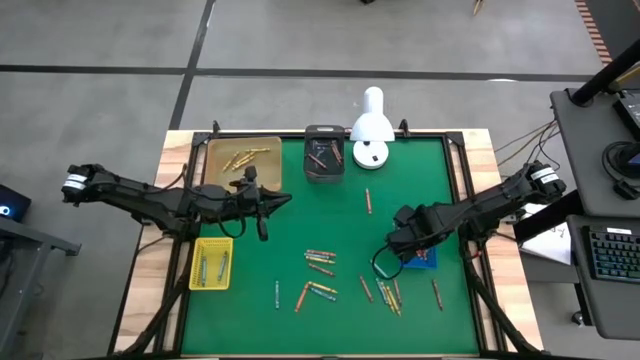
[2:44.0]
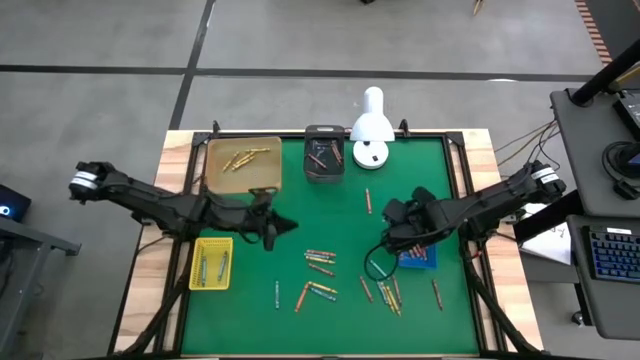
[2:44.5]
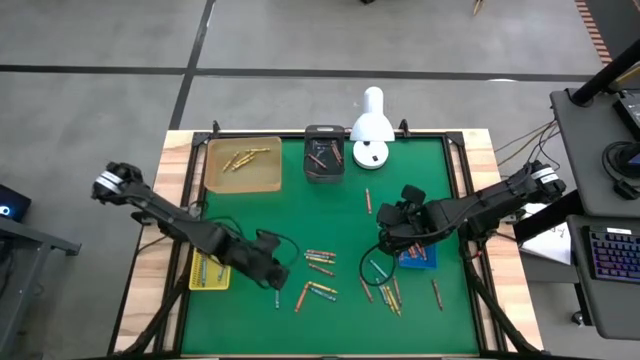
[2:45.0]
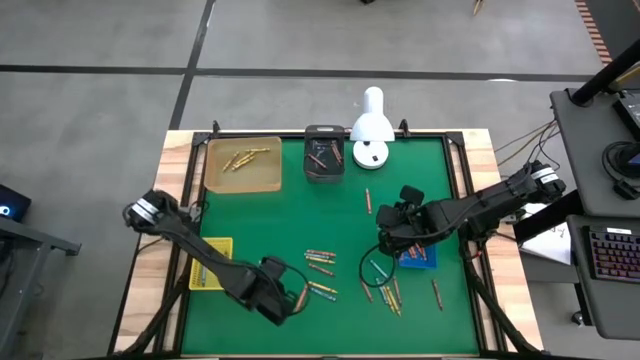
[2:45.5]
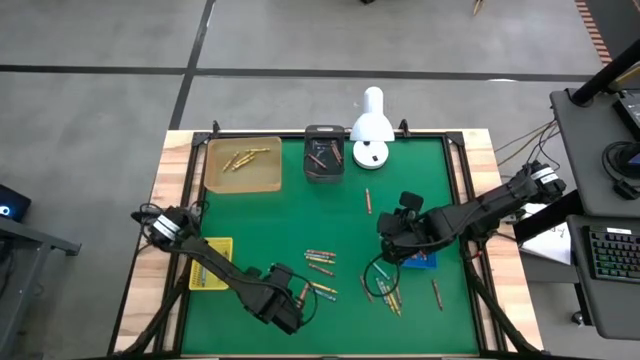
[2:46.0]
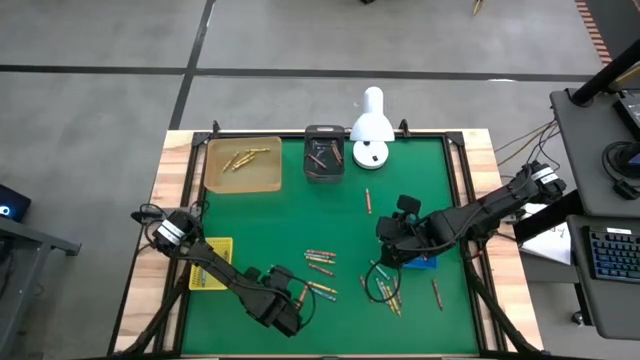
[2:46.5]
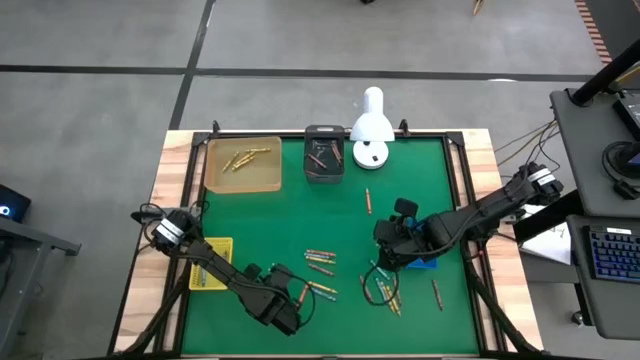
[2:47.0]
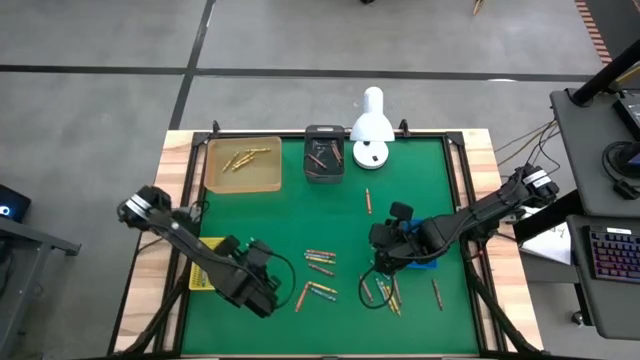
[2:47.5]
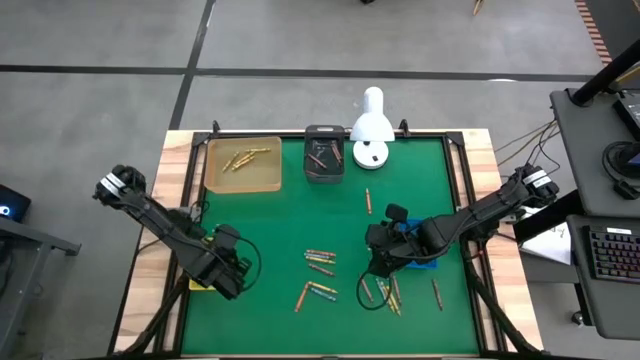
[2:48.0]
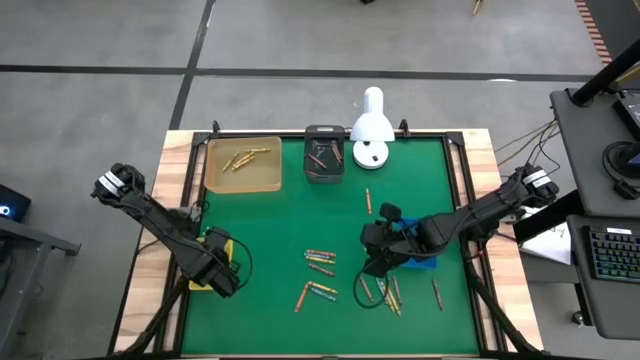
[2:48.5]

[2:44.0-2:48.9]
Task: Sort crayons
Put the blue crayon into the yellow bin

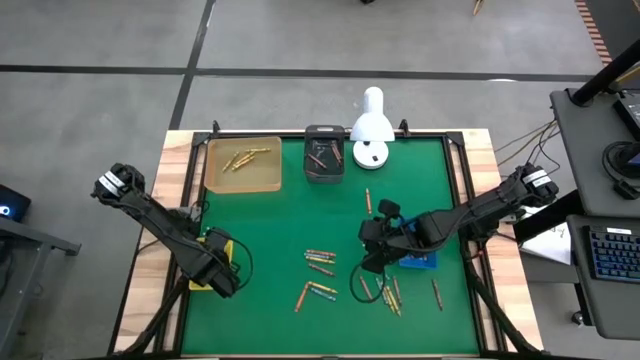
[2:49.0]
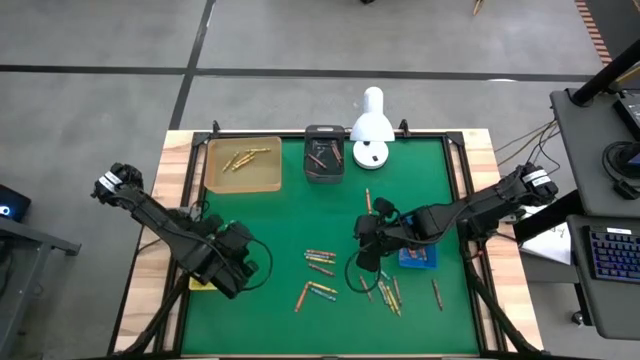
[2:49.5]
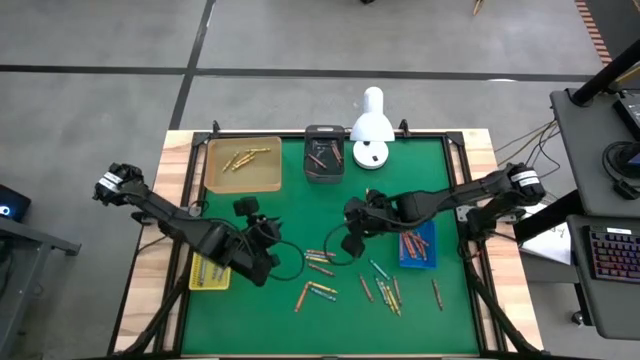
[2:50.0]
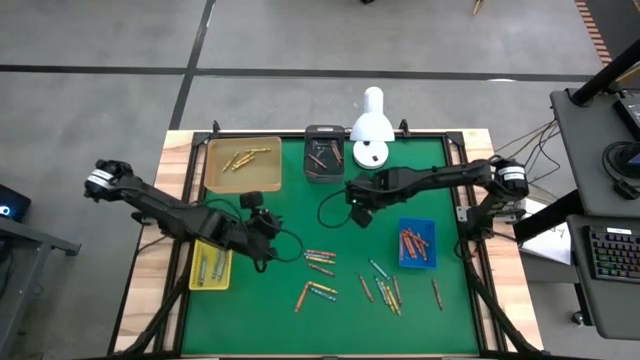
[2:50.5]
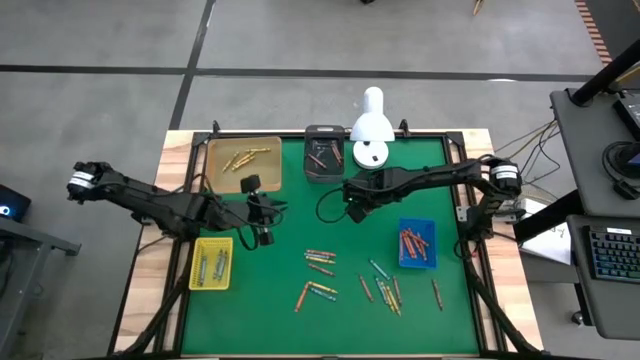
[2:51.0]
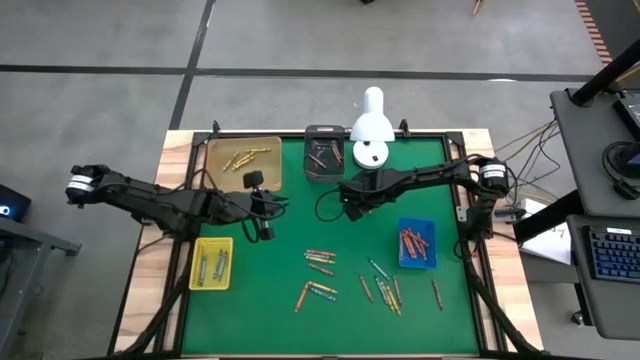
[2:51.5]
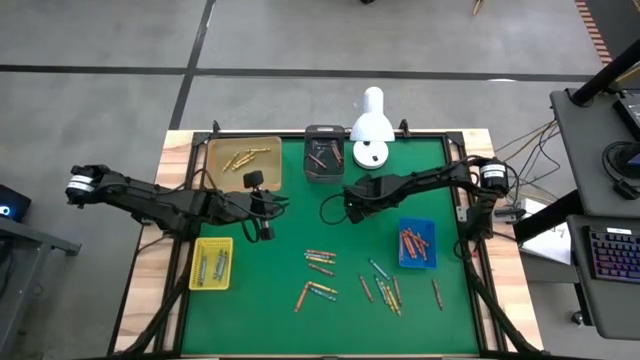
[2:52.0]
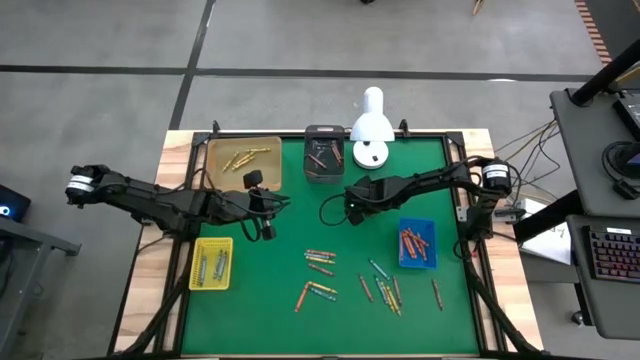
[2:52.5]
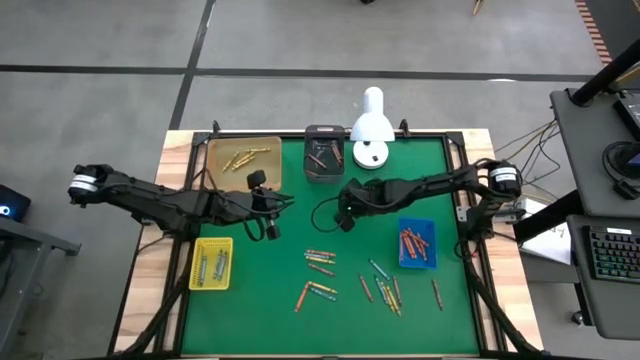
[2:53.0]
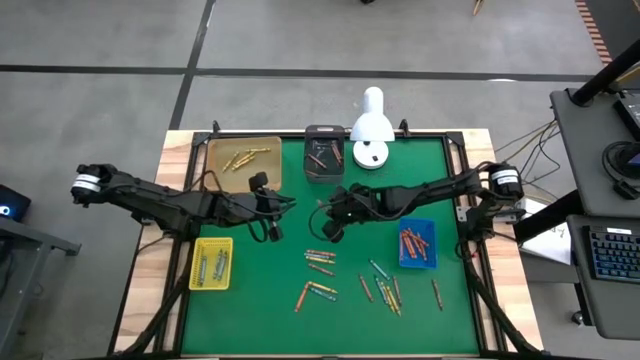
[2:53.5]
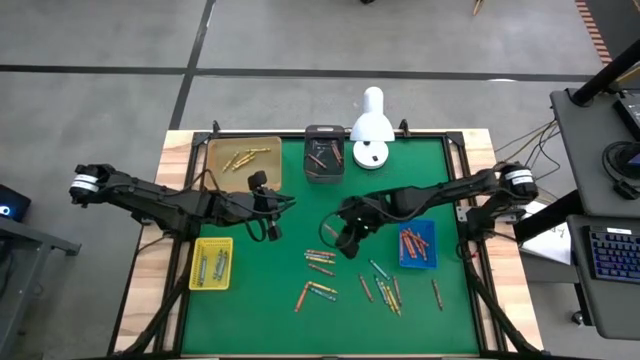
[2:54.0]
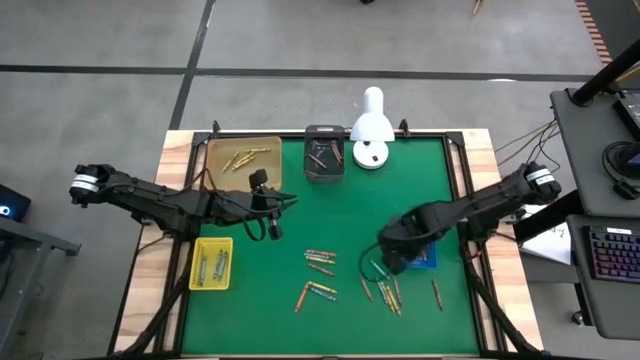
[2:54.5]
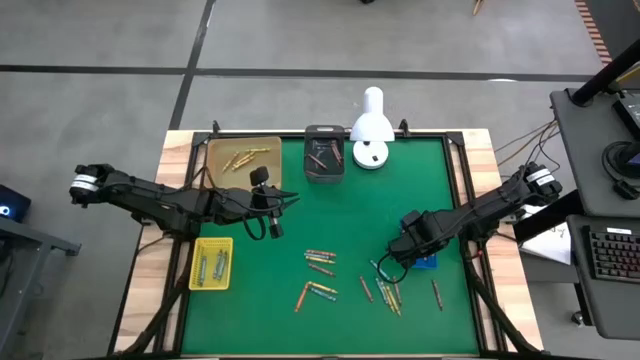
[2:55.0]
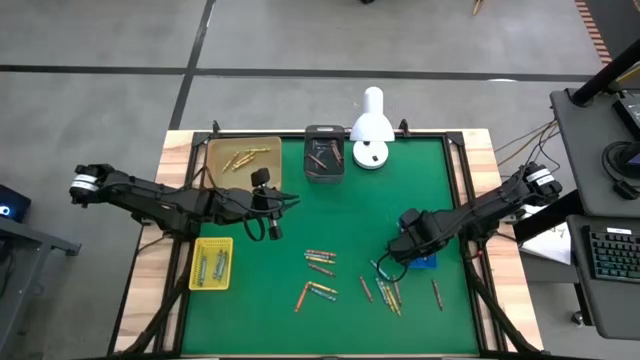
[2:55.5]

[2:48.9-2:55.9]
Put the orange crayon into the blue bin

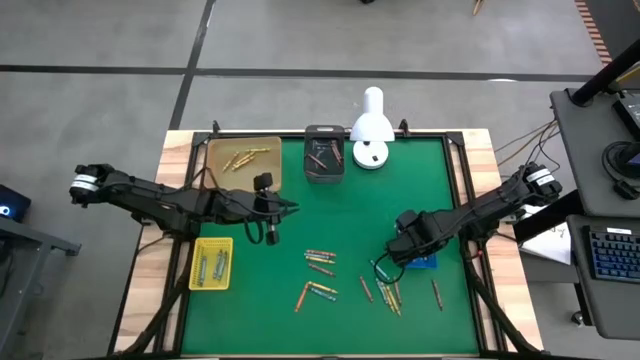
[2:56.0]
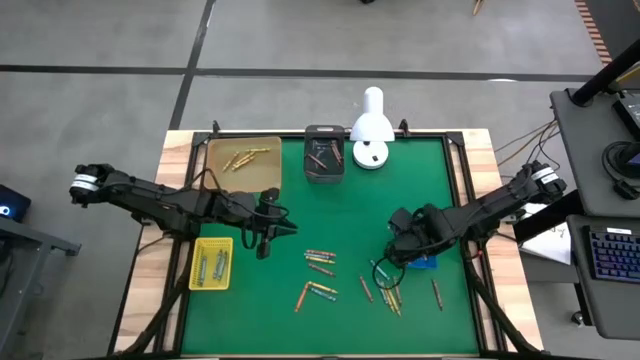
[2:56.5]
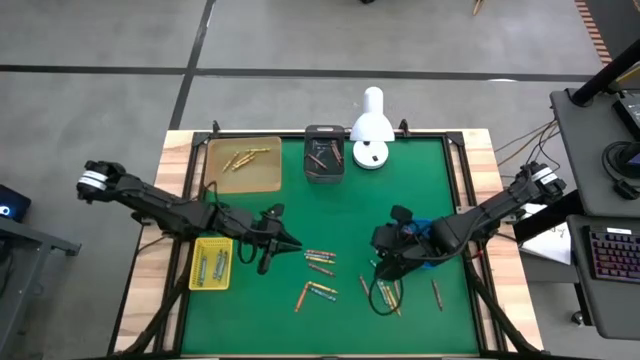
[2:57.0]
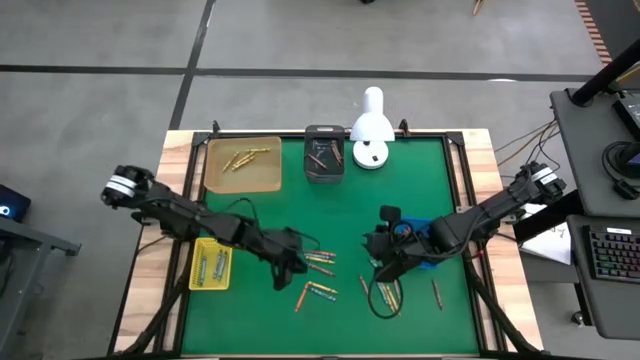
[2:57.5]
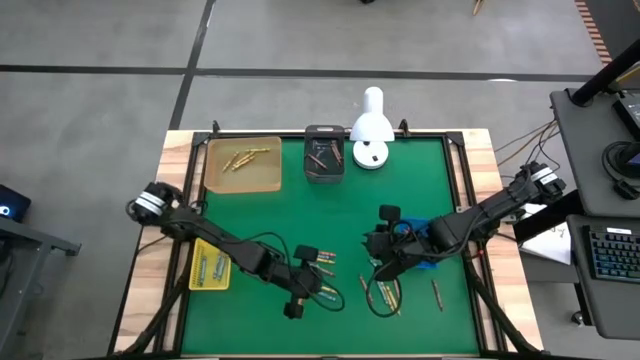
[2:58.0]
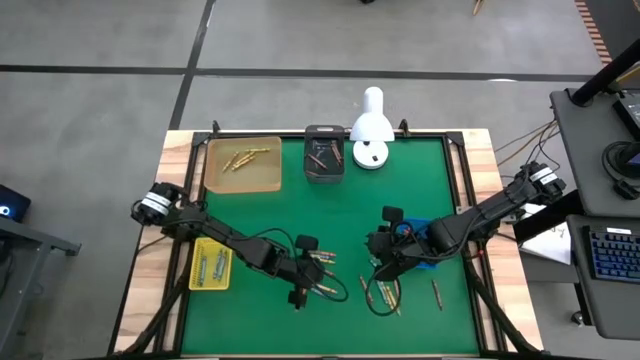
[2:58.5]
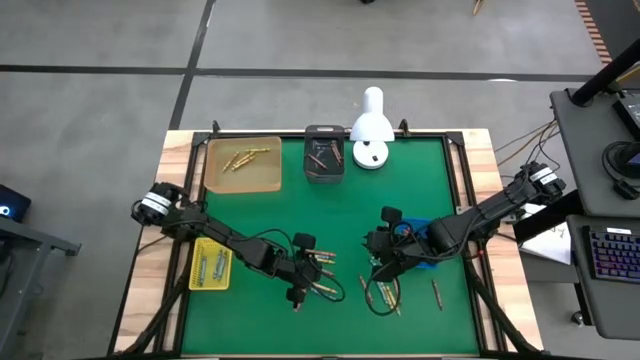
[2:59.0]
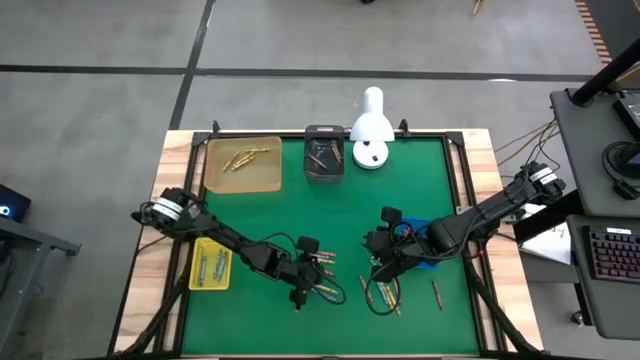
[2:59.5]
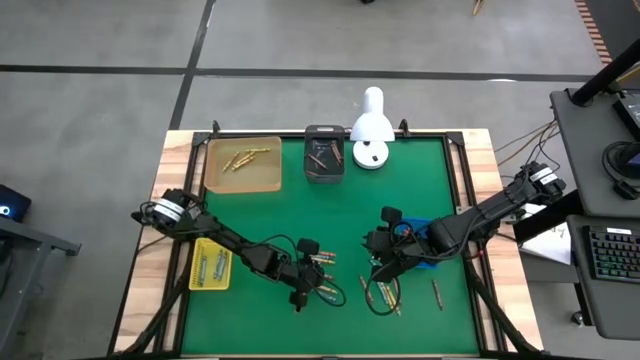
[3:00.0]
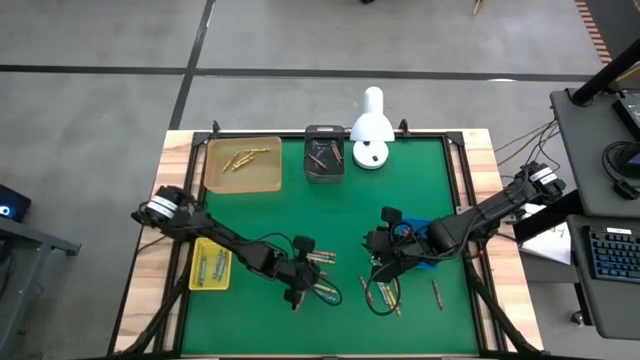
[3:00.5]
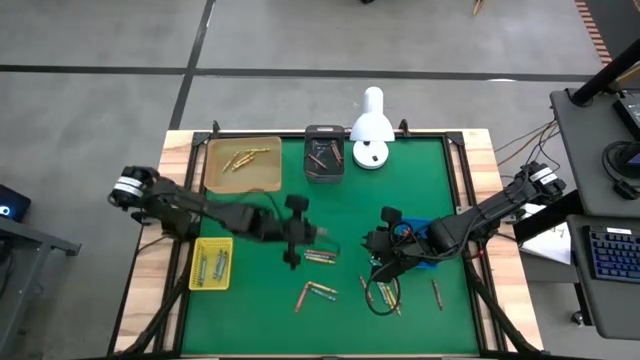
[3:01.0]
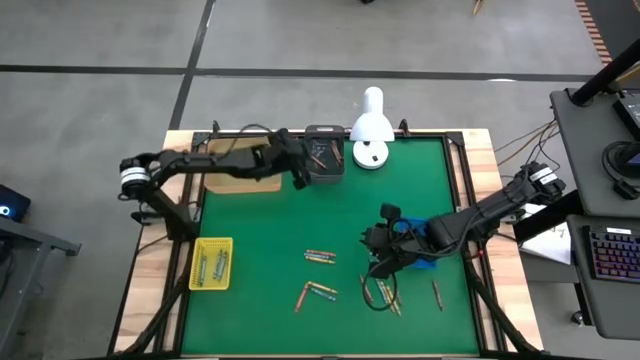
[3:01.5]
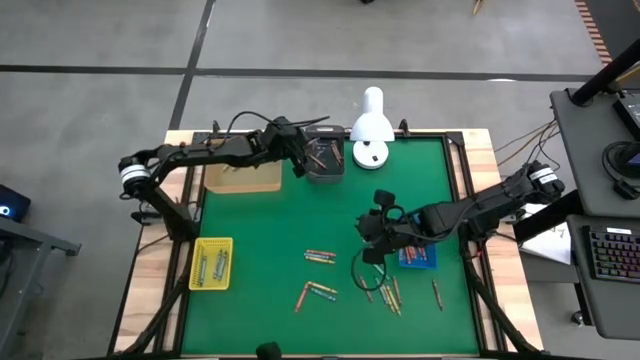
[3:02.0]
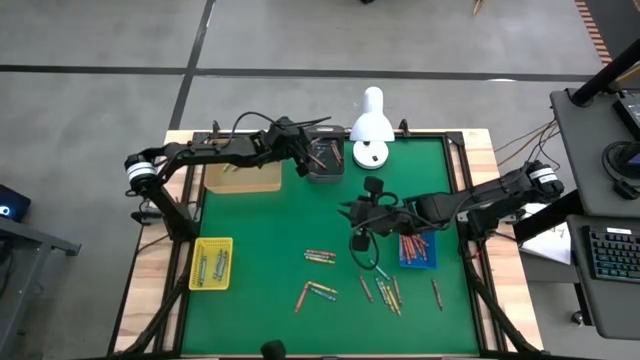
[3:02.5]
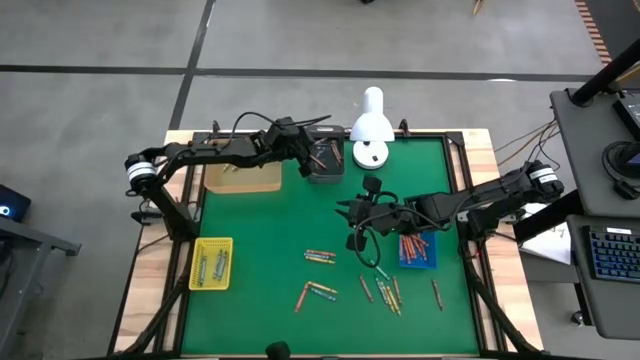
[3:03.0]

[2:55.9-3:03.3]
Put the brown crayon into the black bin

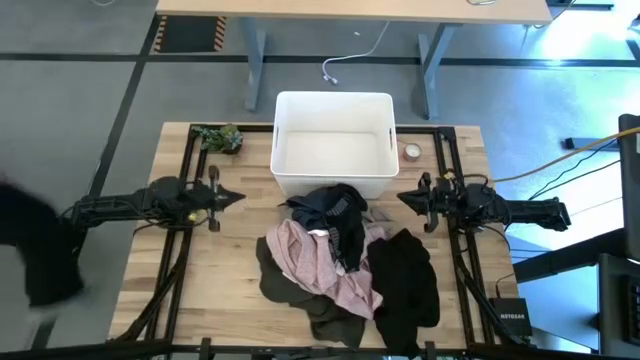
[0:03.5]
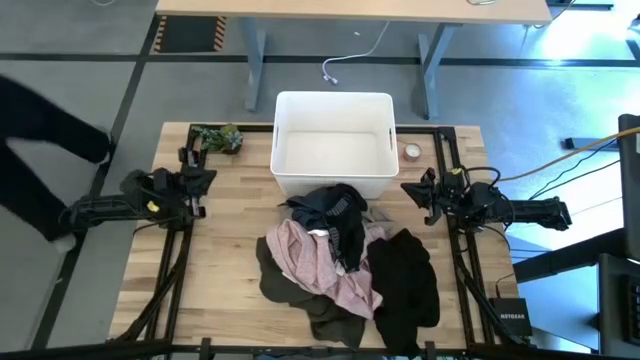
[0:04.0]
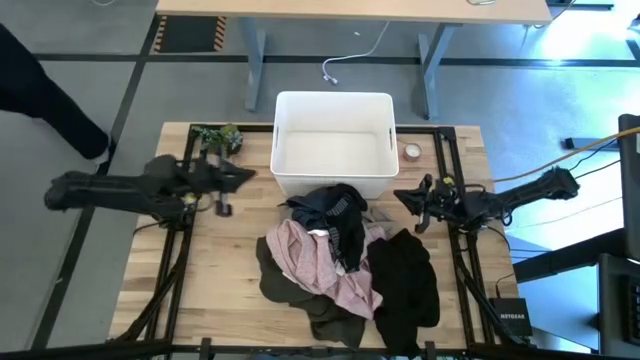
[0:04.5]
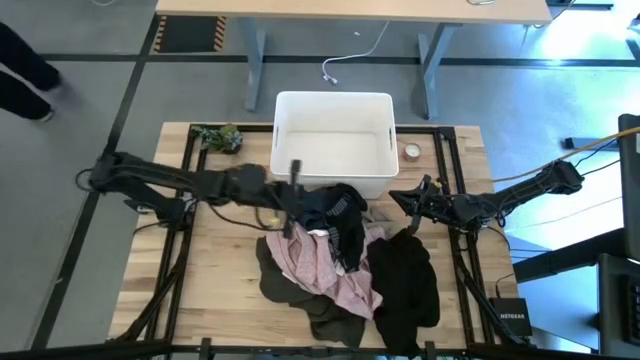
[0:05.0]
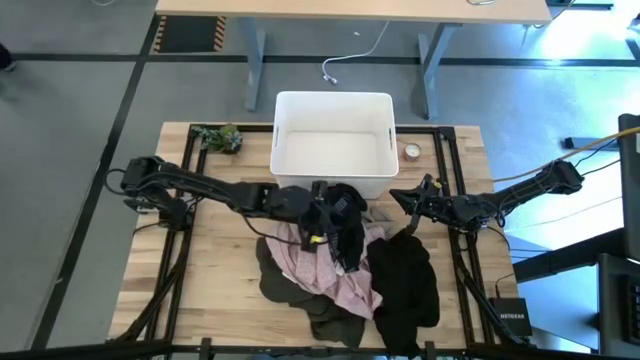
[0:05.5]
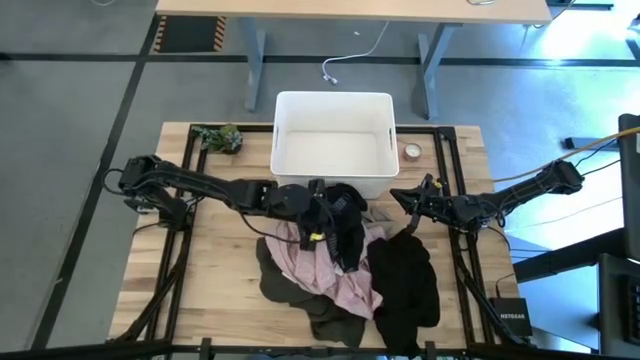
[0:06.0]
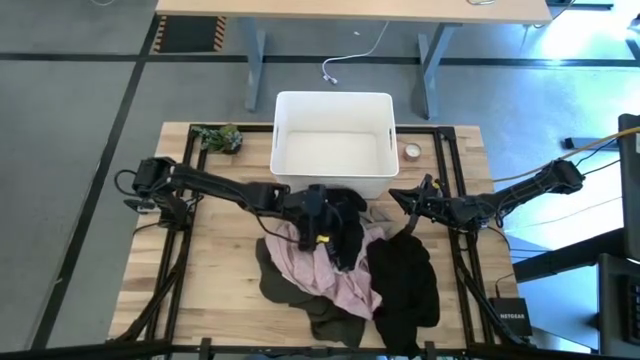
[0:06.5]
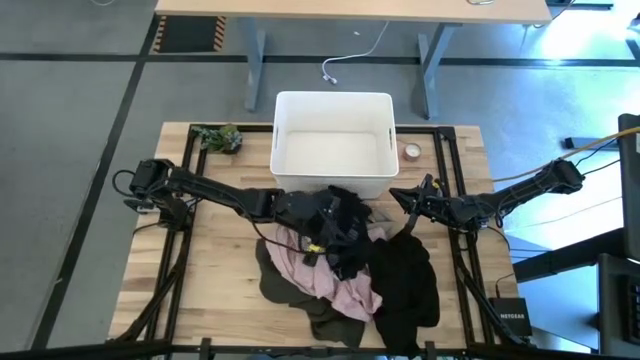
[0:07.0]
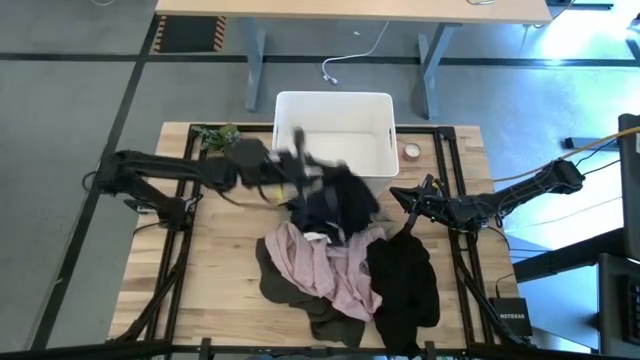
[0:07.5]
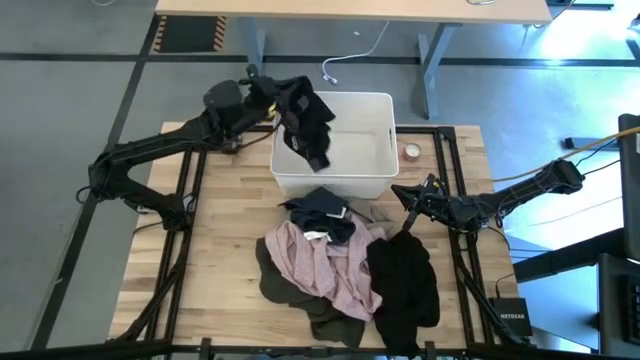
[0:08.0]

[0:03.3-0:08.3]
Task: Sort clothes
Put the black underwear into the white laundry bin
